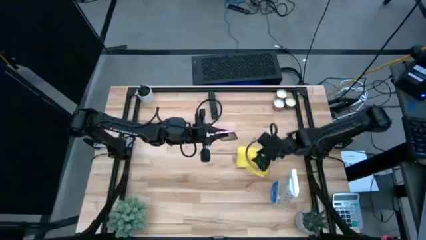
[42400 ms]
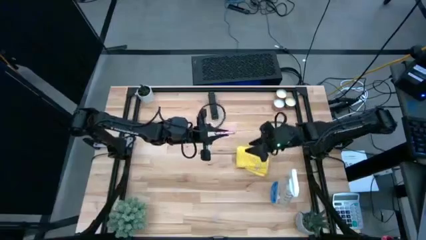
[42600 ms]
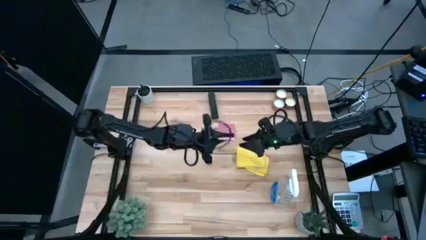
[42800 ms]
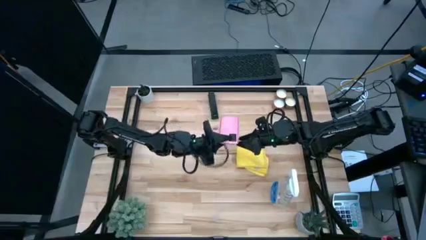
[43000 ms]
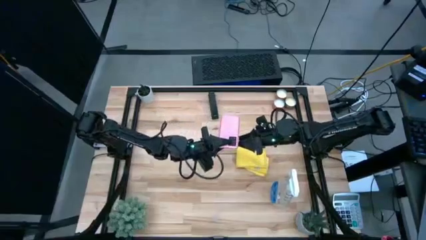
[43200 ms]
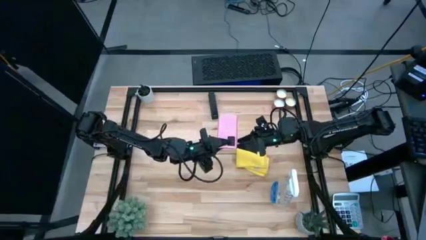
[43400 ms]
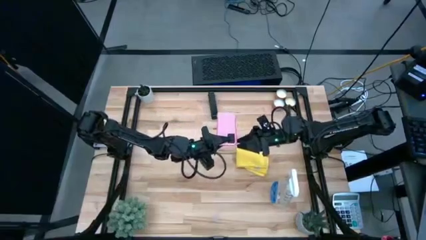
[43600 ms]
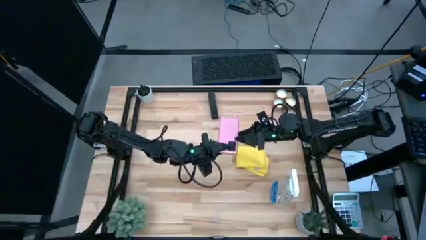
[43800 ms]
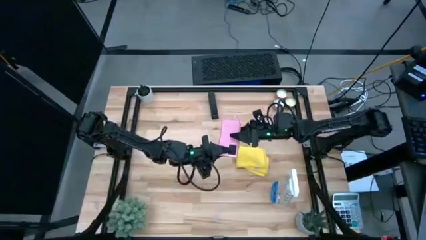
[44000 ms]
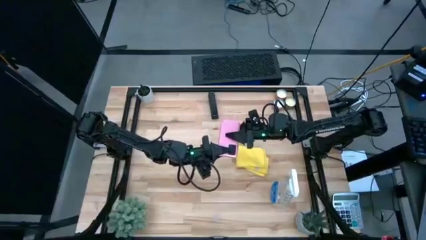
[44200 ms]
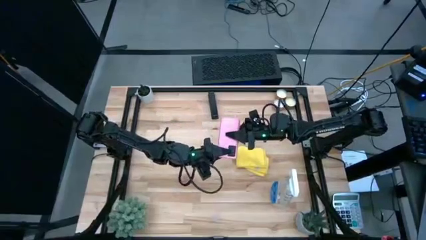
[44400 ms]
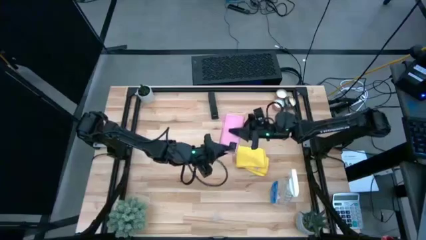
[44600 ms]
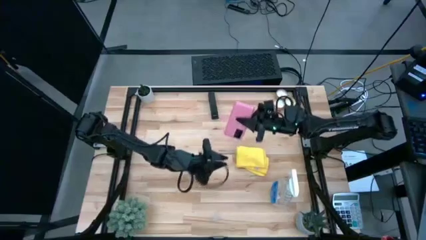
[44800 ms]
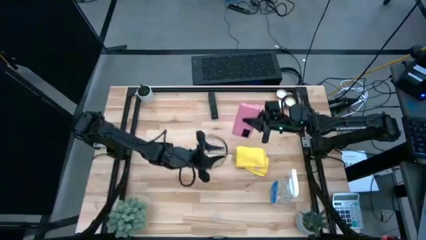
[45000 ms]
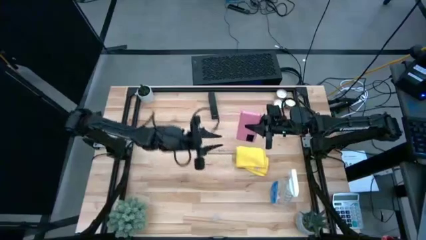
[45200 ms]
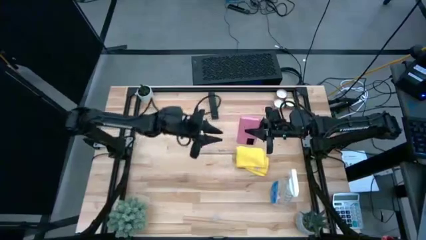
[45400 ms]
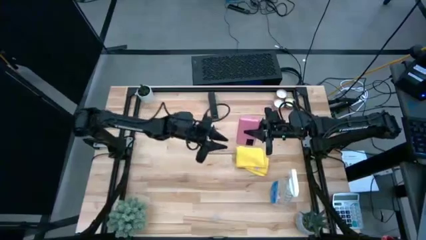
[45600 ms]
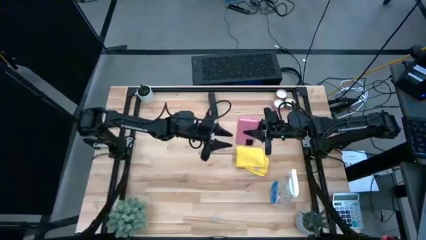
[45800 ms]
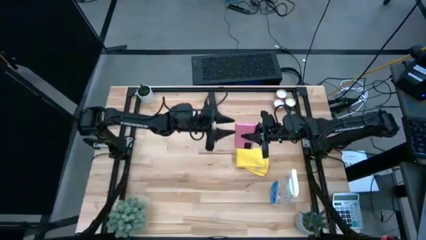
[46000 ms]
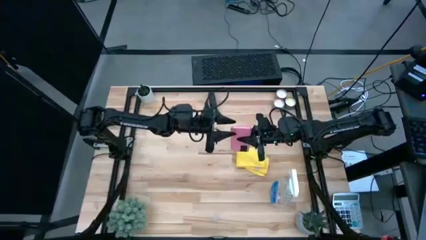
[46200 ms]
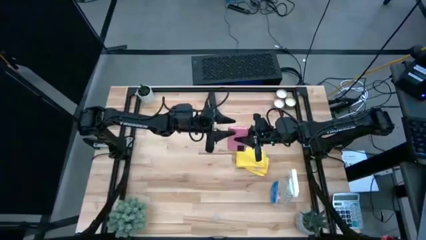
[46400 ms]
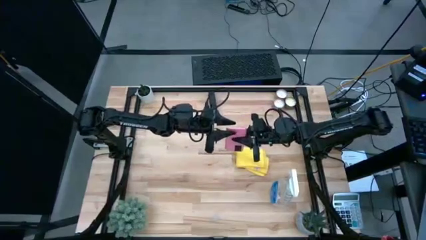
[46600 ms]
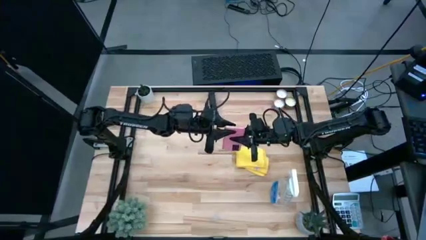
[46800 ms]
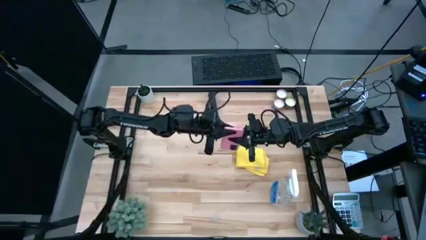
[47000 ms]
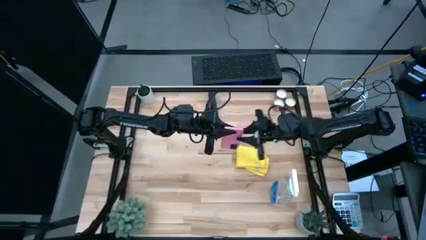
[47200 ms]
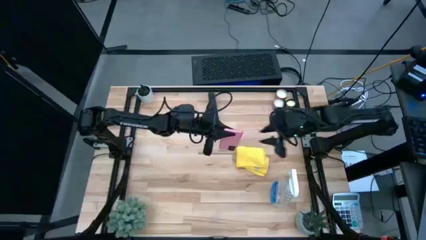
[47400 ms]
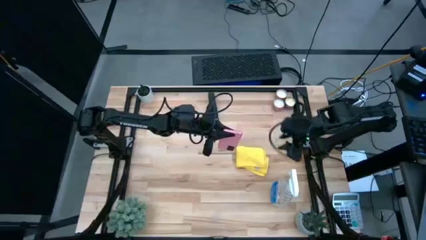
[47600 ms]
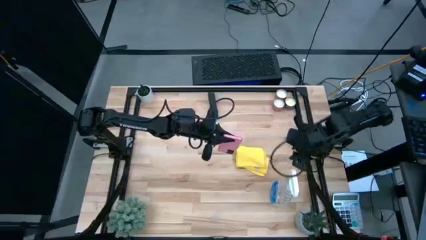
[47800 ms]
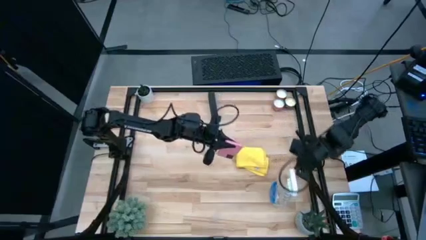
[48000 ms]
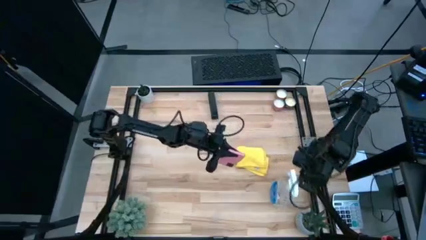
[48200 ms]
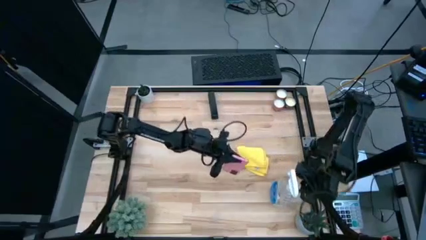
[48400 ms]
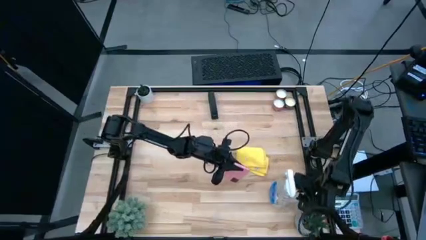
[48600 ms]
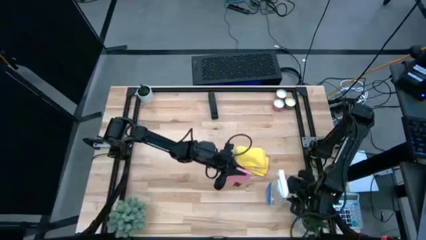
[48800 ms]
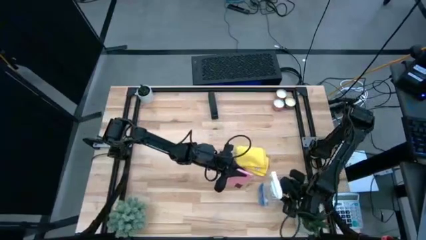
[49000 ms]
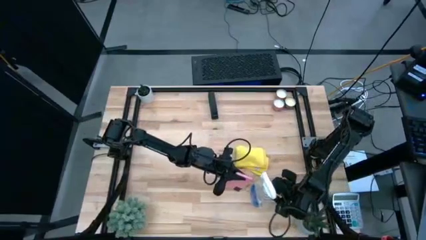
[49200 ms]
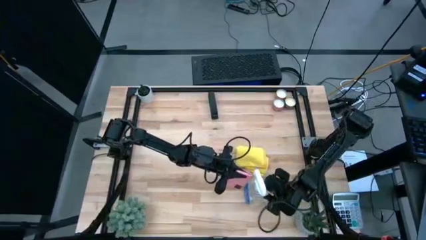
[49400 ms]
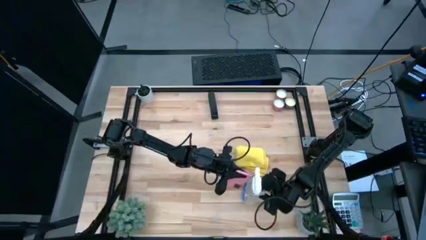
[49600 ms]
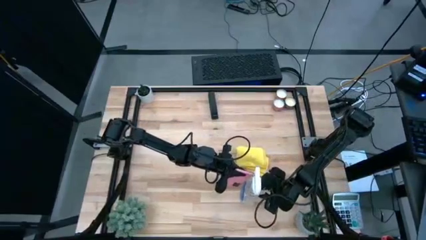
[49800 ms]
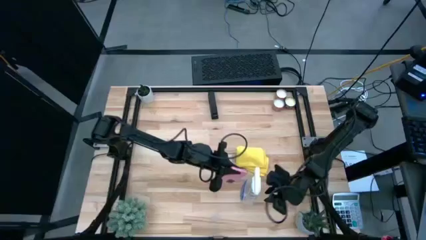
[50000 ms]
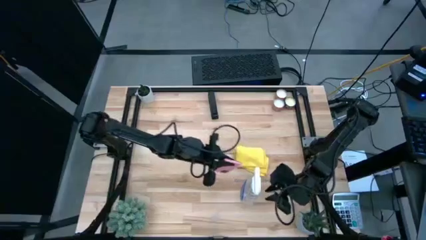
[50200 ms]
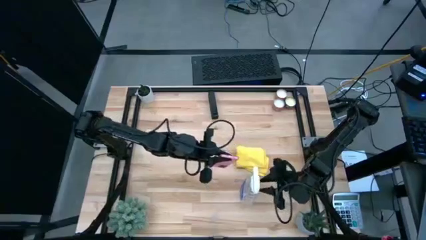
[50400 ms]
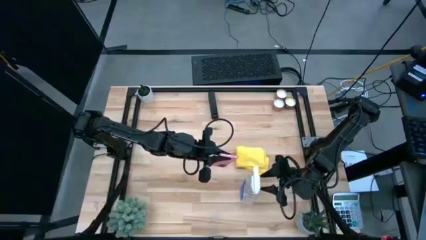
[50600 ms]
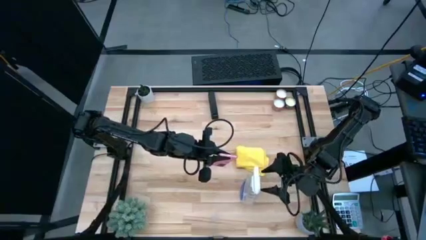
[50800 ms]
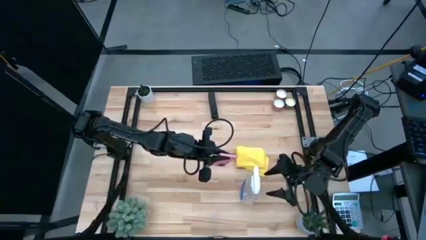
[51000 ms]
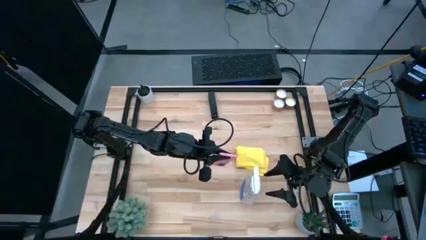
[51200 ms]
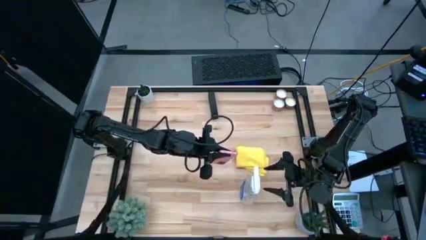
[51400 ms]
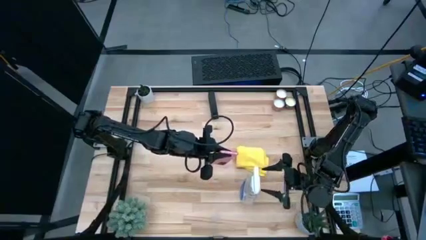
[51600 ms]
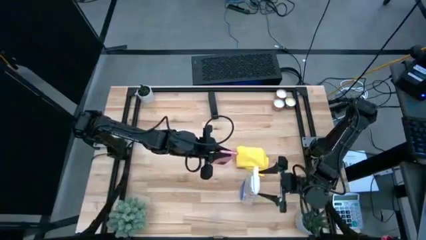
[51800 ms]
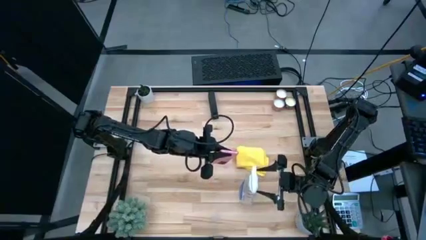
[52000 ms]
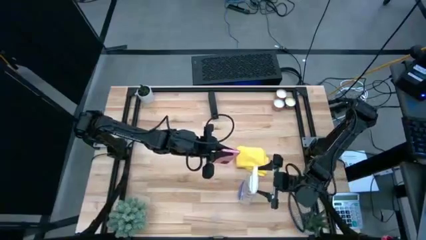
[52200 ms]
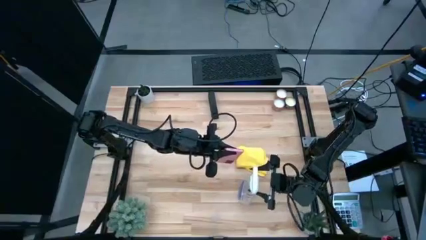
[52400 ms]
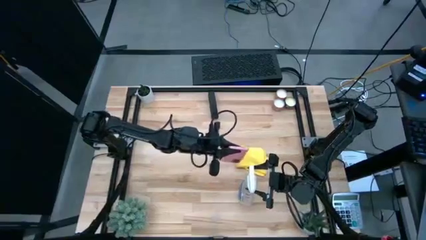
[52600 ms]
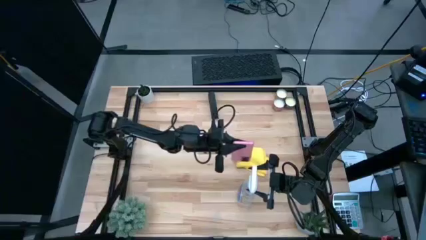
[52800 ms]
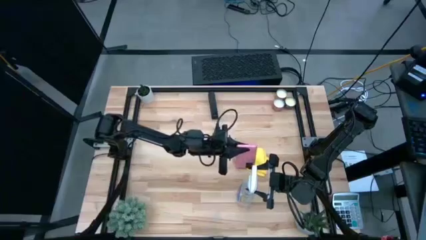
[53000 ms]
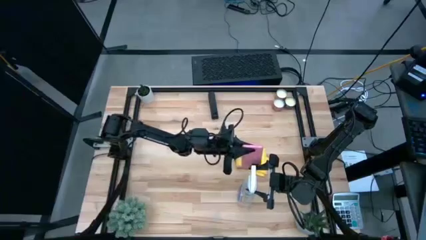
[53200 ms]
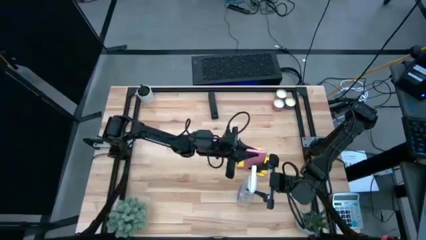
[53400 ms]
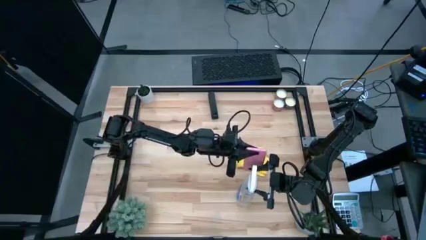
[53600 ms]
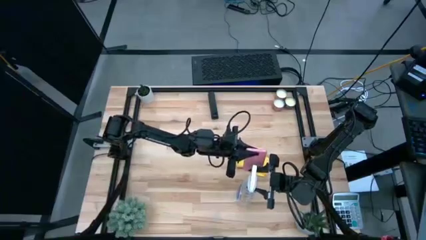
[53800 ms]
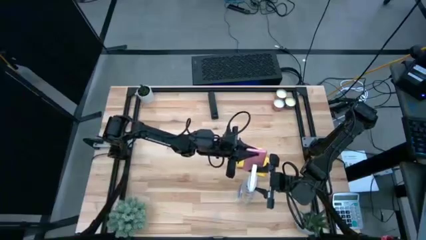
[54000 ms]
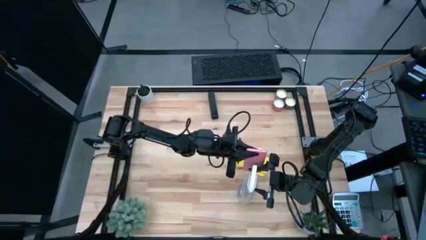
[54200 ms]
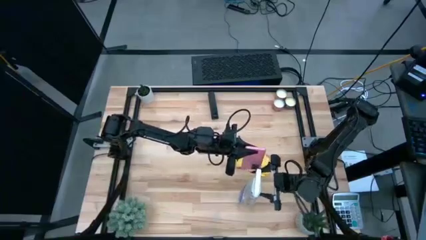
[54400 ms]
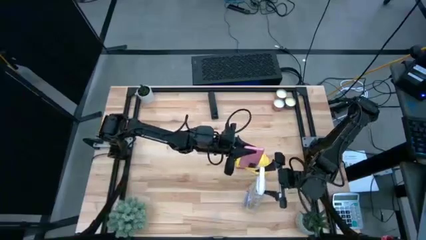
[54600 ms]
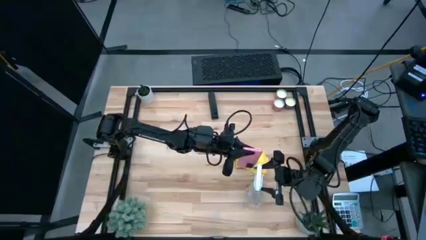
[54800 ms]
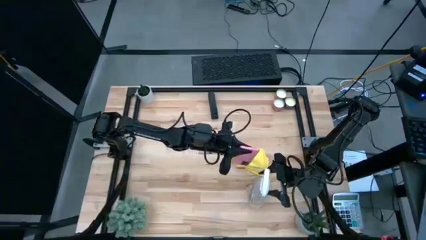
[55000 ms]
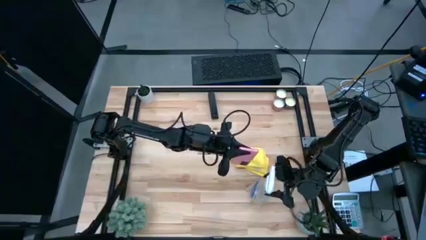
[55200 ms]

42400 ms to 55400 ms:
Task: Apply microfiber cloth
Spray the cellphone using a spray bottle
